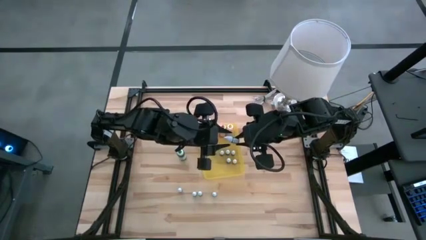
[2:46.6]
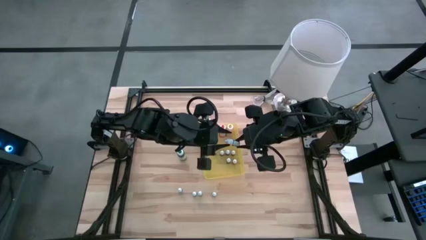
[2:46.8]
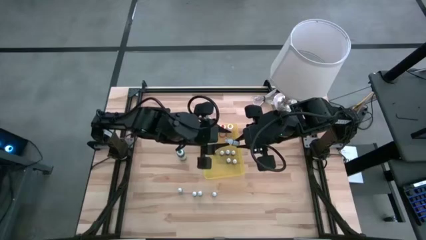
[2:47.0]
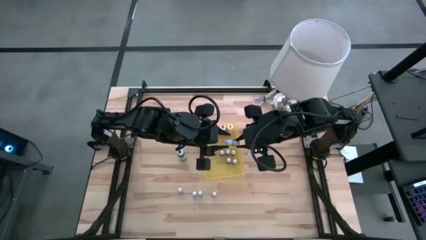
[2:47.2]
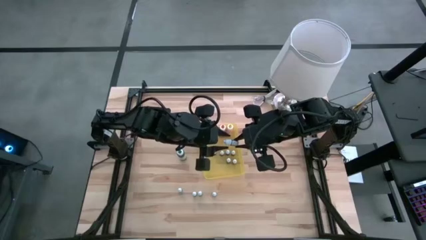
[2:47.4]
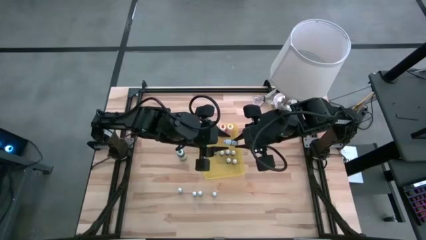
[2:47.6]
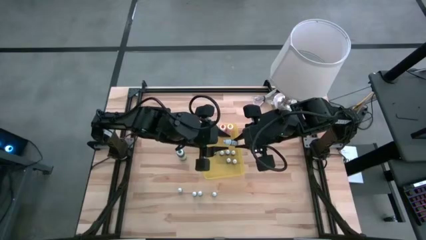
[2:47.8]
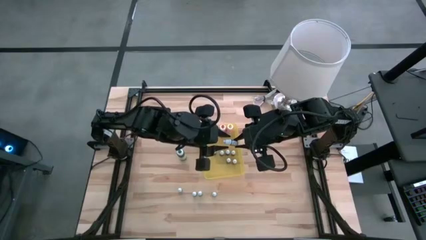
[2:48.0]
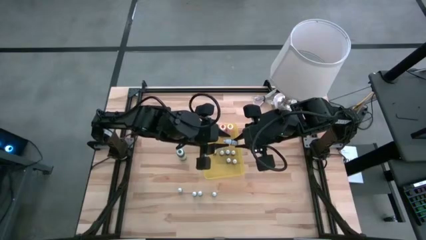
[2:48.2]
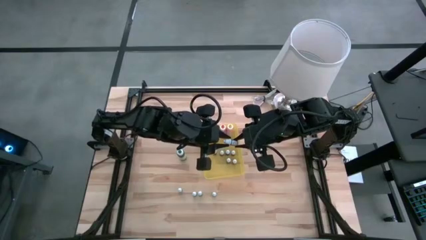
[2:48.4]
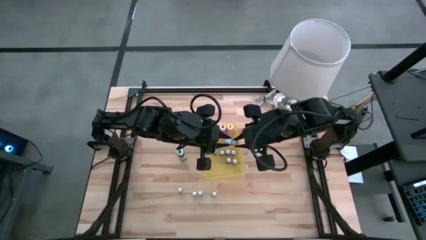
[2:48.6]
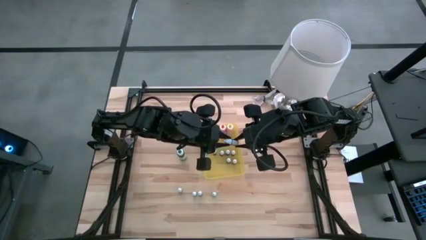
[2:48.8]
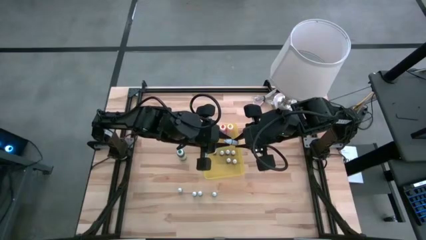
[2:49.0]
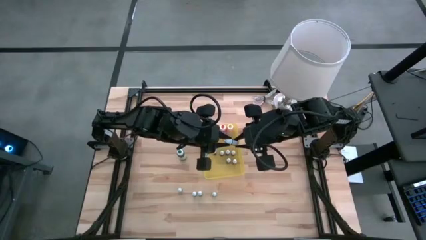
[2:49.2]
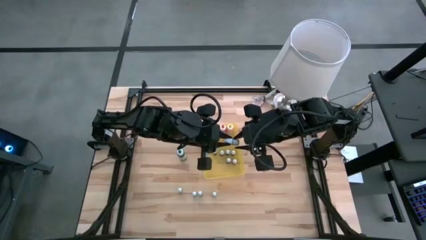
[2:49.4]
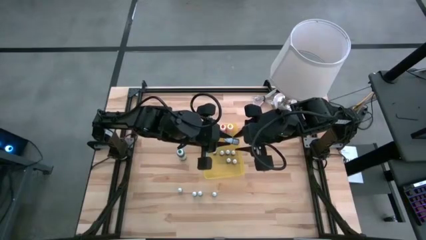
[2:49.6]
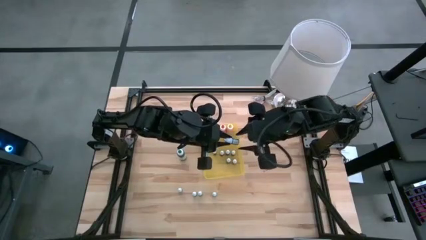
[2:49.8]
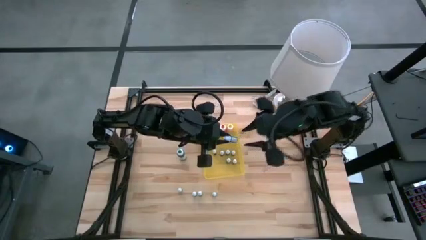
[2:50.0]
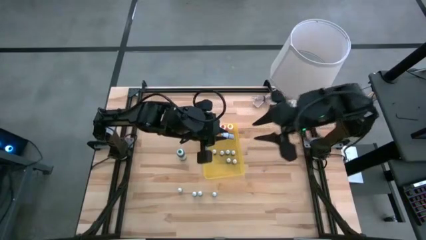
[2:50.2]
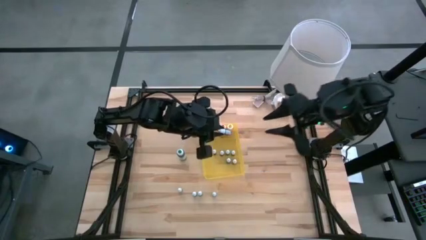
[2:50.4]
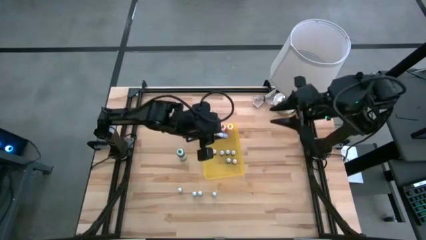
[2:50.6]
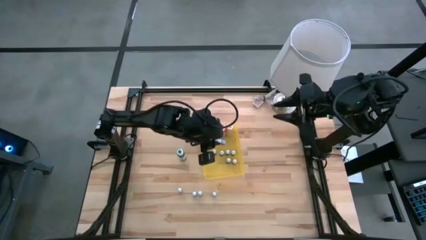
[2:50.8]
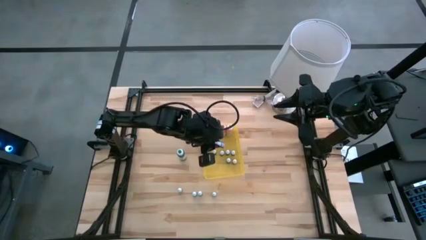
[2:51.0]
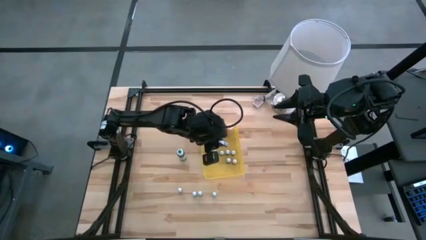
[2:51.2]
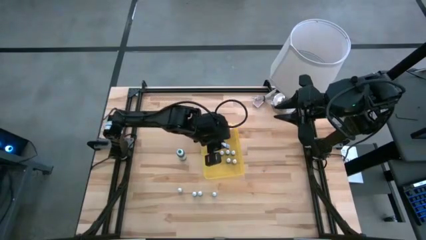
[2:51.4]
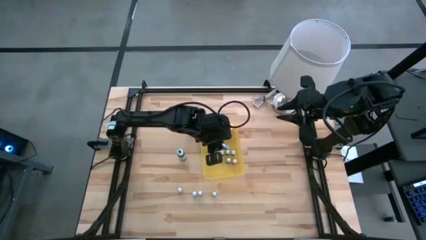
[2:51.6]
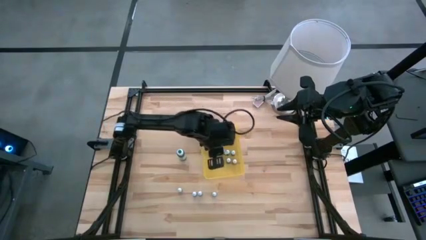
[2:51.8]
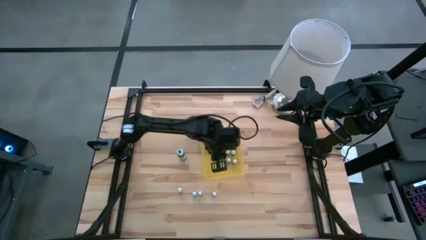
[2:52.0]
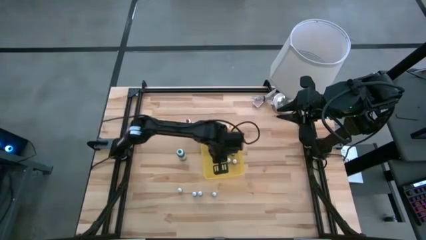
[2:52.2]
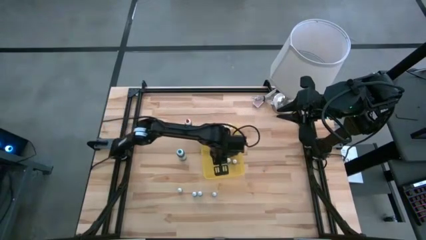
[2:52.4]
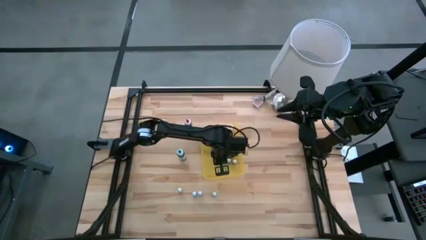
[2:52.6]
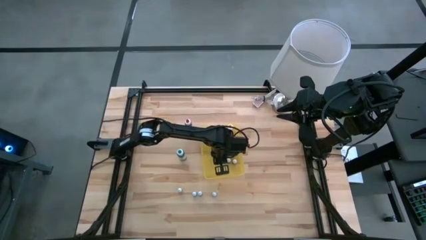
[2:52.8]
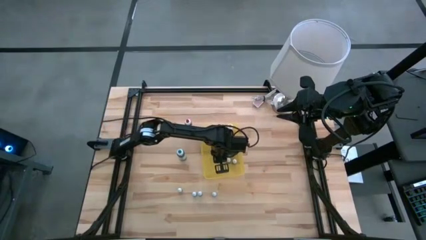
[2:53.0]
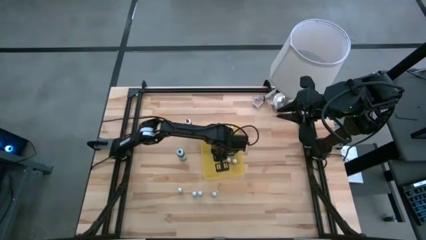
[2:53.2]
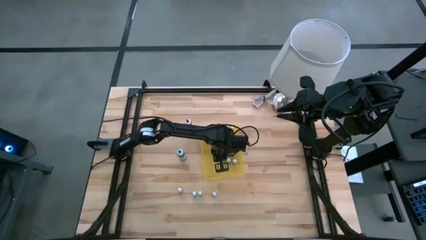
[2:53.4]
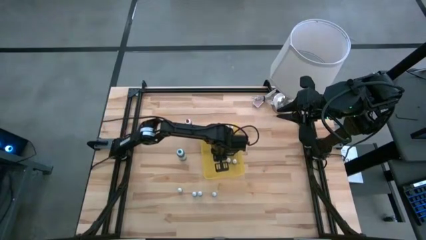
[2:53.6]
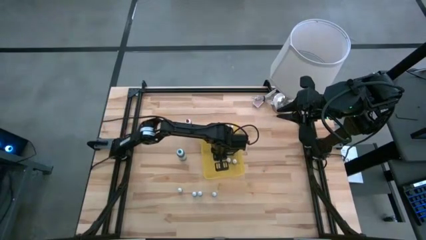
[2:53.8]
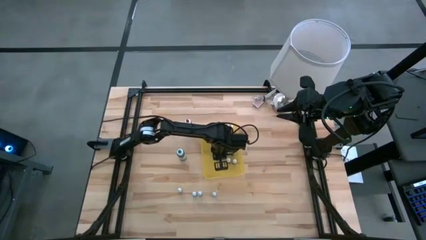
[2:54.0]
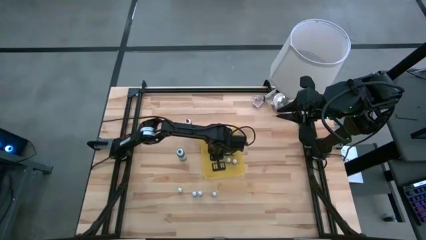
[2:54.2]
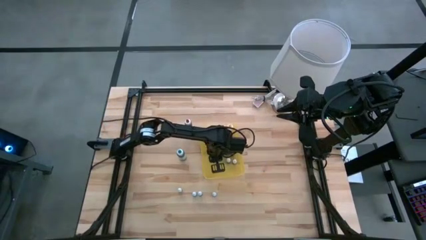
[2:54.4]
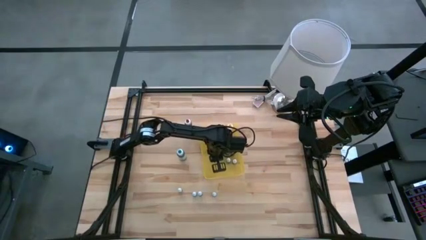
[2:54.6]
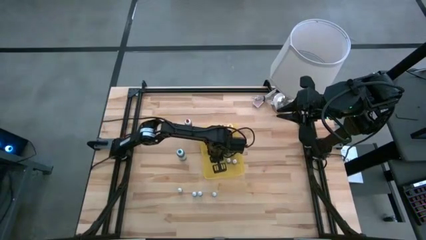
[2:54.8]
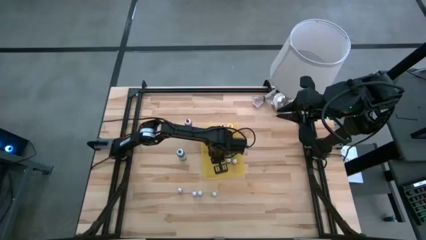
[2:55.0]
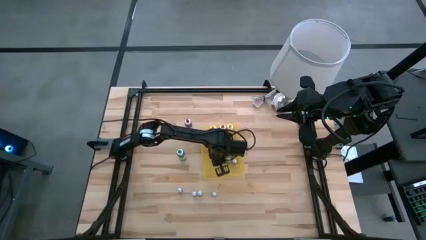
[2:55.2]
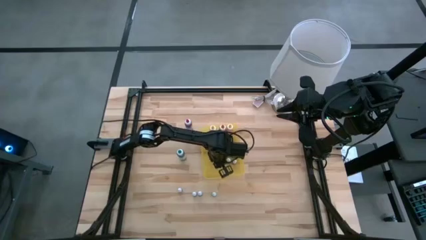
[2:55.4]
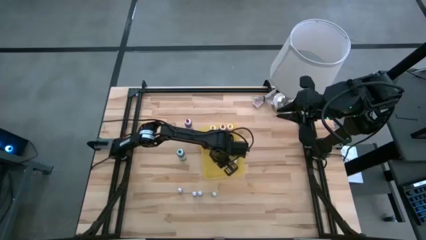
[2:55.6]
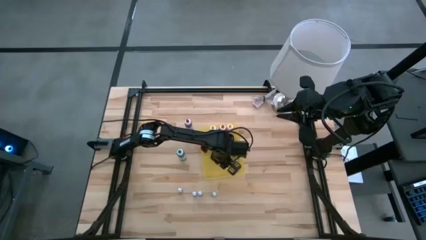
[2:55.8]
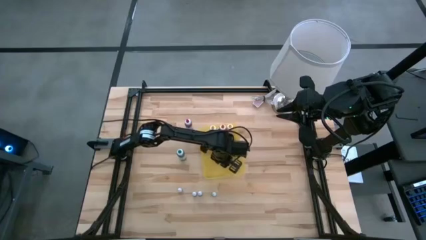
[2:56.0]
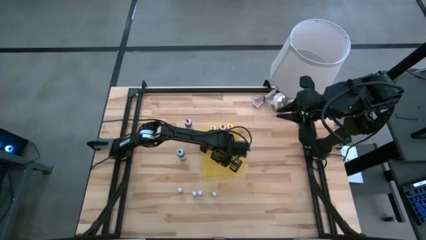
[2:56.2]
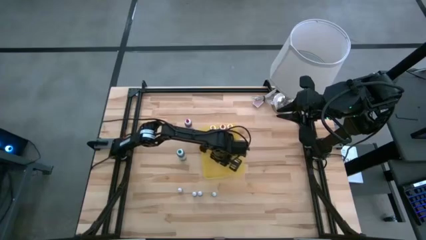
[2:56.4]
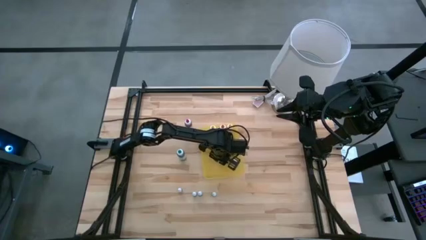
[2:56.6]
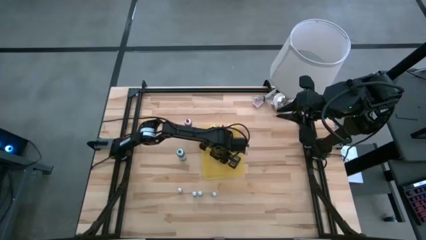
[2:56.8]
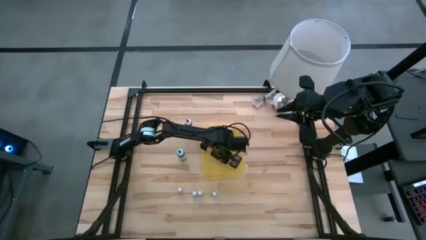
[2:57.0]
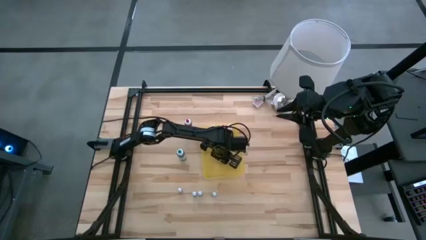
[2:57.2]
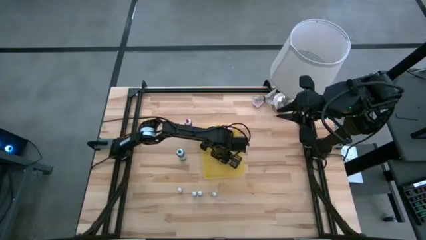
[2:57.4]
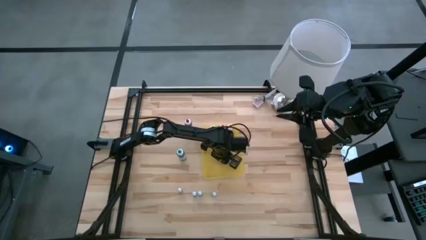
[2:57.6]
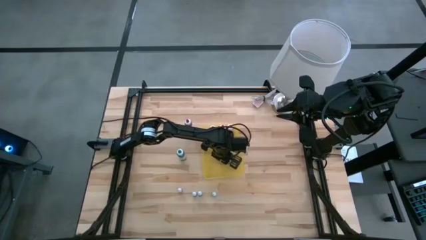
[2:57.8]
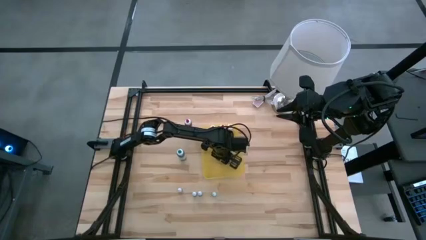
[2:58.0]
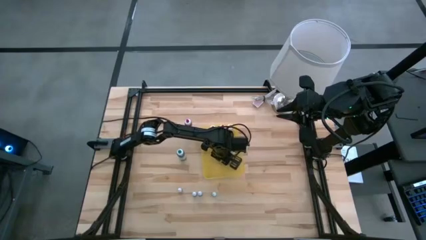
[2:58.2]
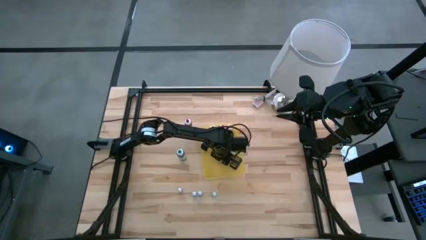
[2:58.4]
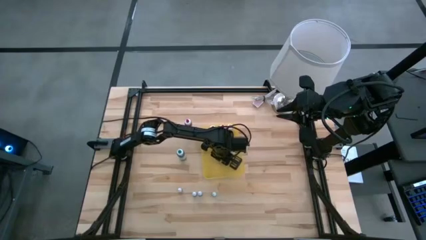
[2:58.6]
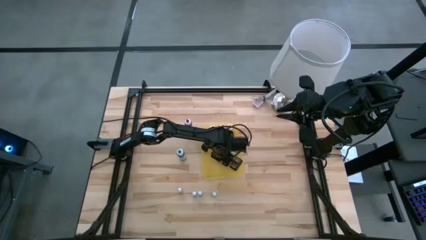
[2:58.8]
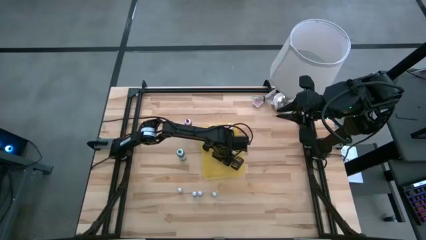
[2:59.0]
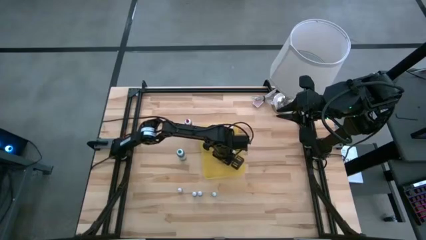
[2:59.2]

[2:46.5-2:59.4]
Task: Pick & Place food coloring
Put the right small black food coloring bottle into the bin

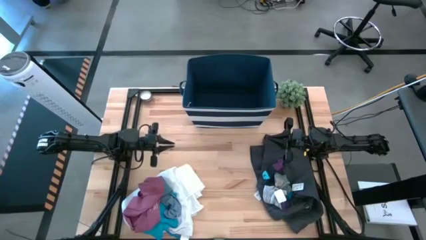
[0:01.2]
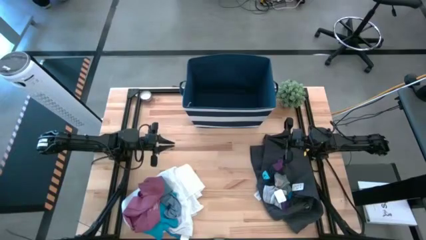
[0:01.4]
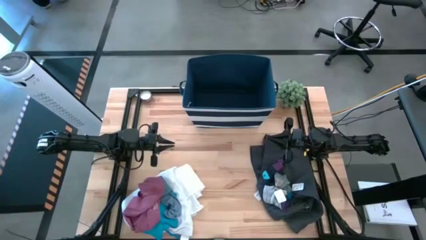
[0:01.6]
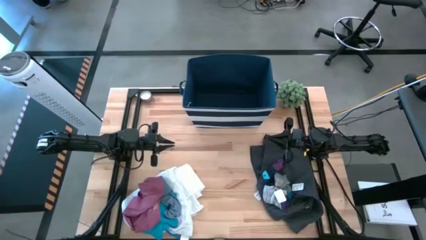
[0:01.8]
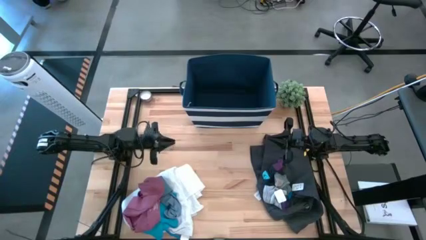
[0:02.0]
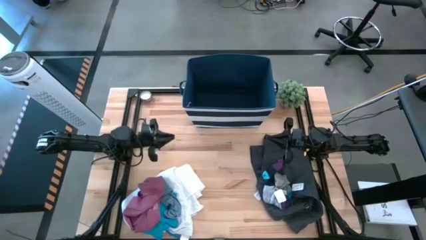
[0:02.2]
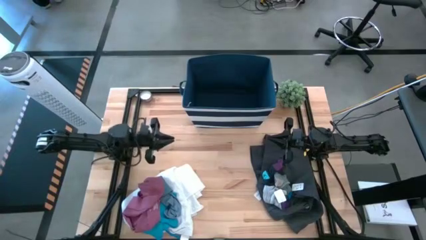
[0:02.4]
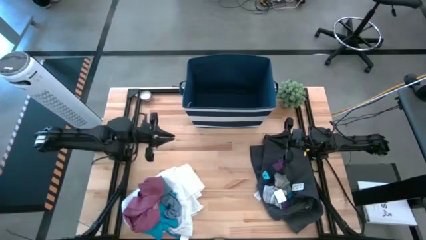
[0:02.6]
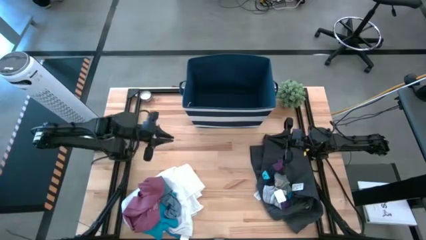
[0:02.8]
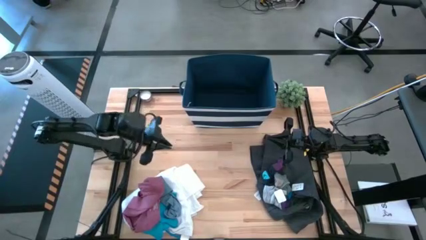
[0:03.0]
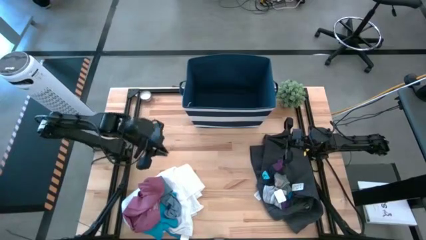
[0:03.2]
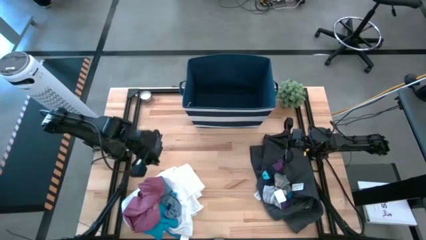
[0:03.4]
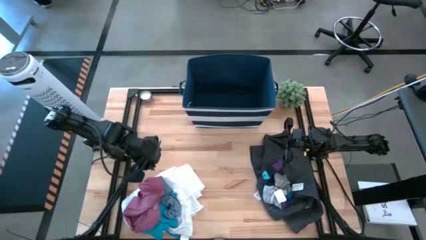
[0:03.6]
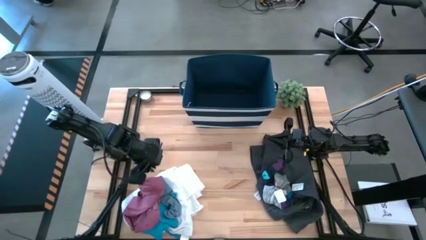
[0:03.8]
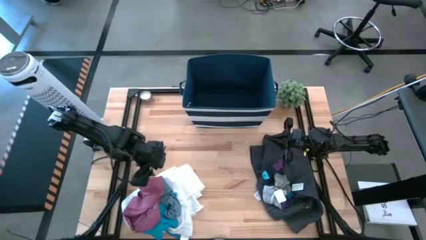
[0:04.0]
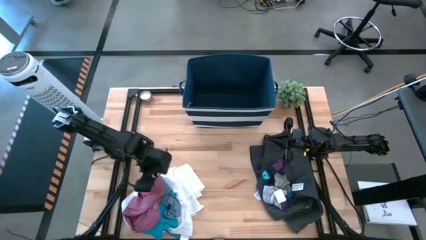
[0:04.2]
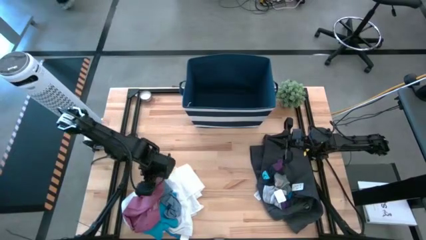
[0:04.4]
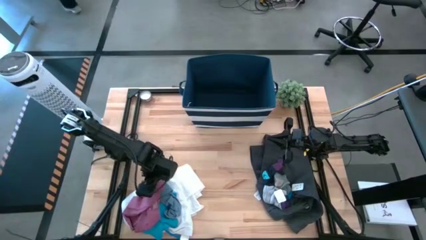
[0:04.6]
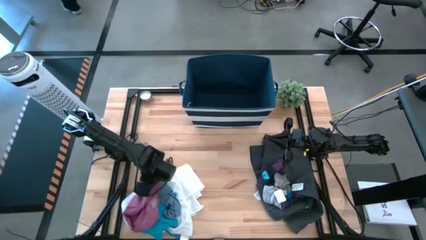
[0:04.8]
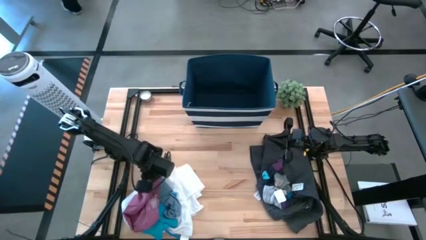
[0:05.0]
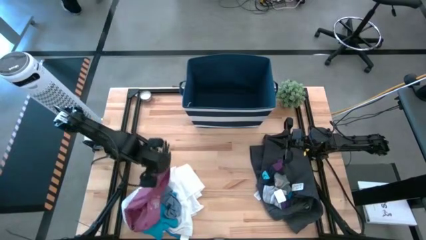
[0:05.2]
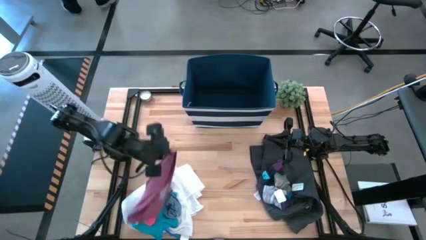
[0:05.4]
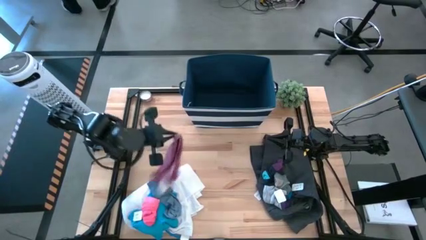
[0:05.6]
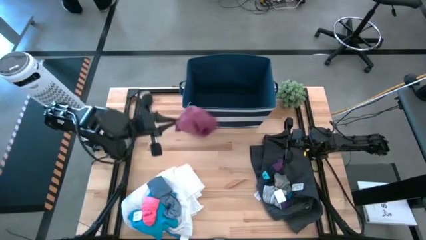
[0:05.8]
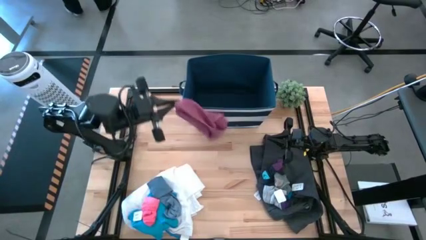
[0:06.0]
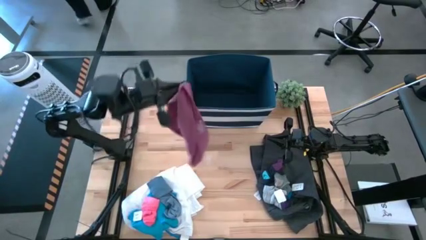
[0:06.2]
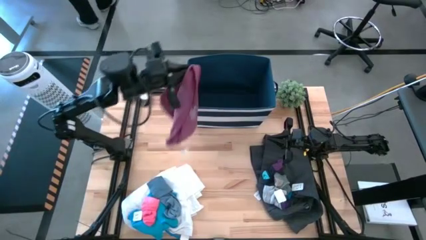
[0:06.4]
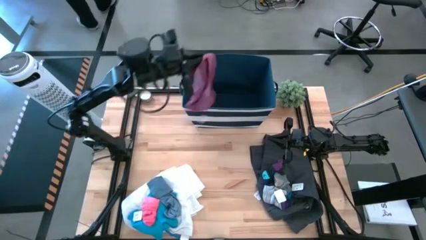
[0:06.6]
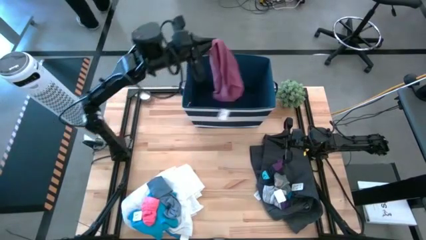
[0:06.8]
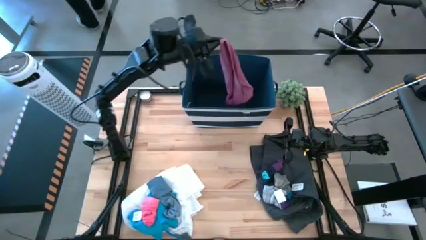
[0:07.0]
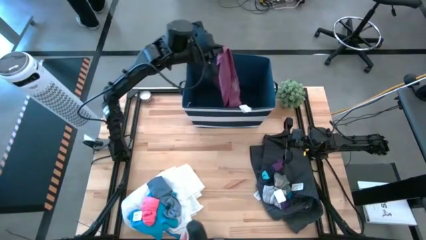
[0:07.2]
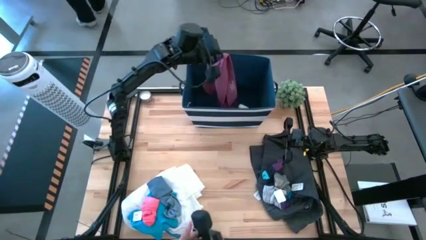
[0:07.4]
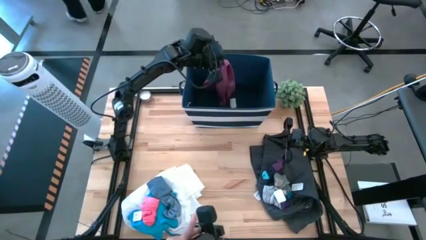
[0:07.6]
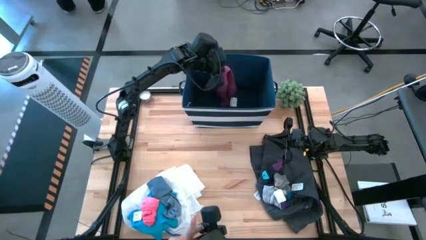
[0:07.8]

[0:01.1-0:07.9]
Task: Sort clothes
Put the purple underwear into the blue bin
